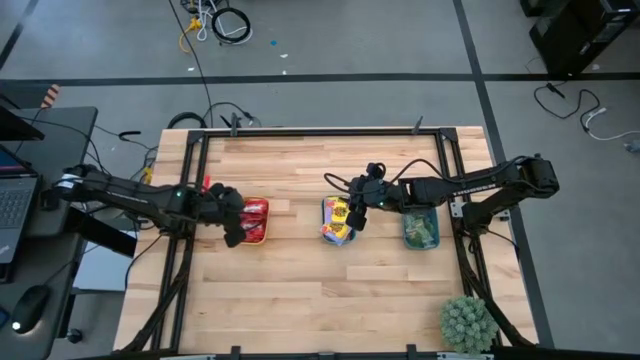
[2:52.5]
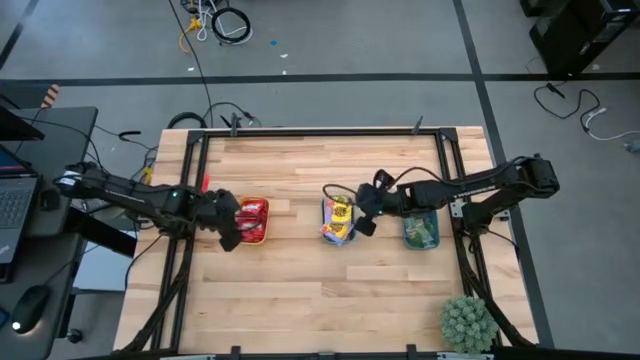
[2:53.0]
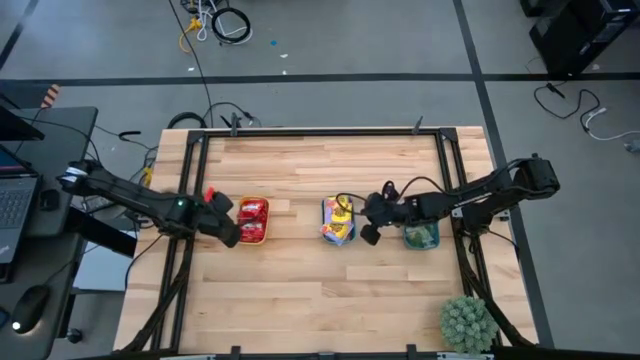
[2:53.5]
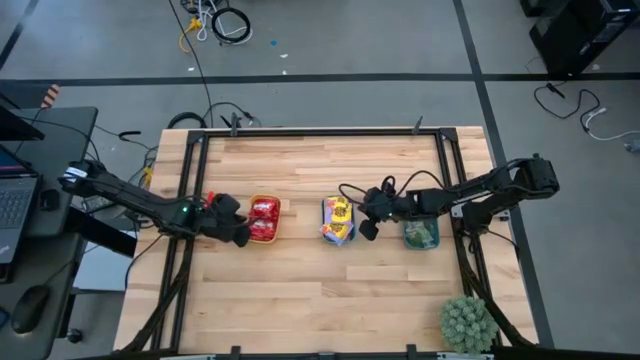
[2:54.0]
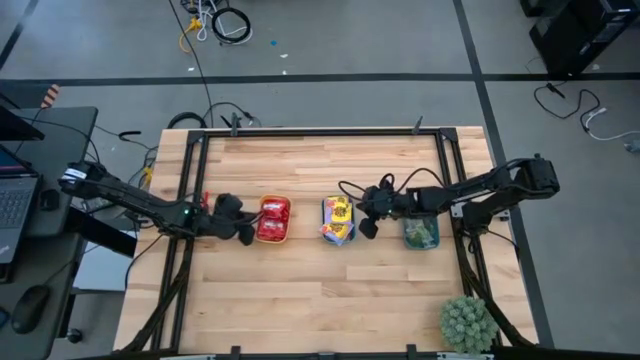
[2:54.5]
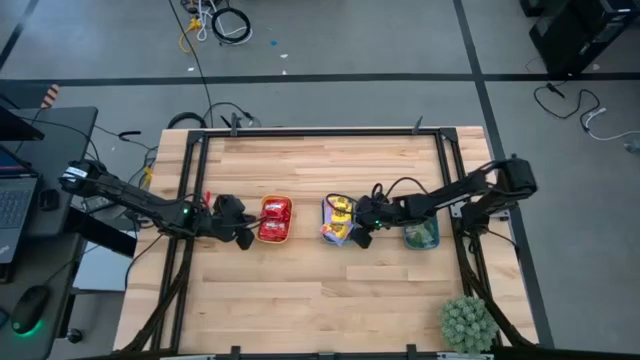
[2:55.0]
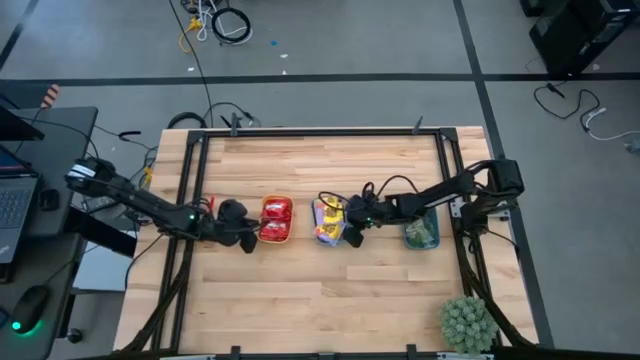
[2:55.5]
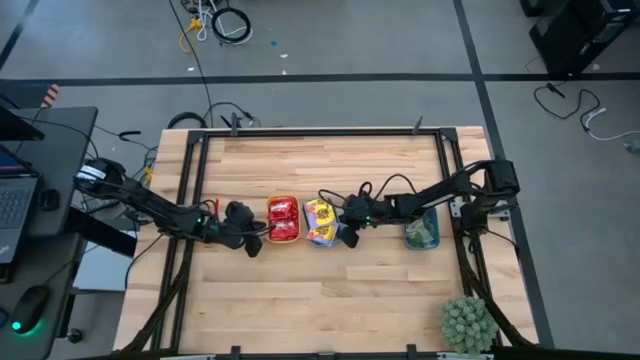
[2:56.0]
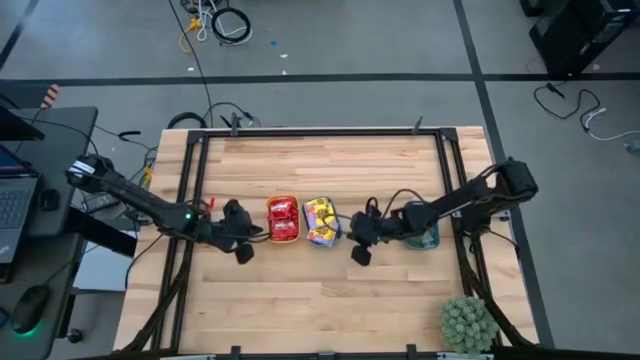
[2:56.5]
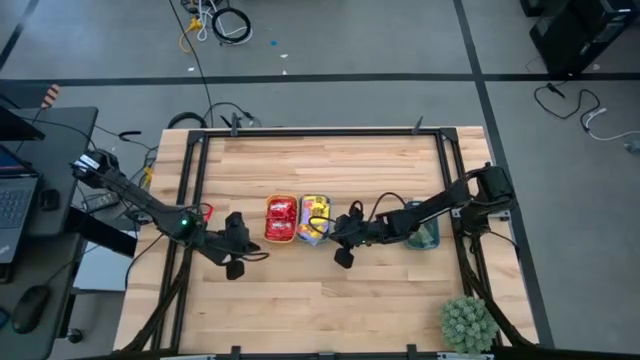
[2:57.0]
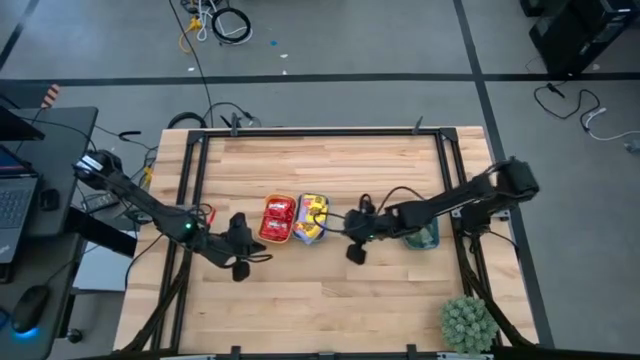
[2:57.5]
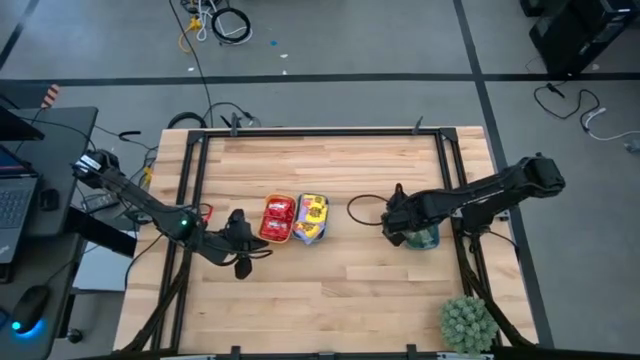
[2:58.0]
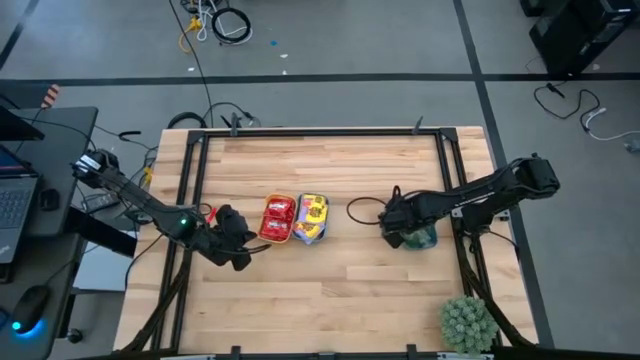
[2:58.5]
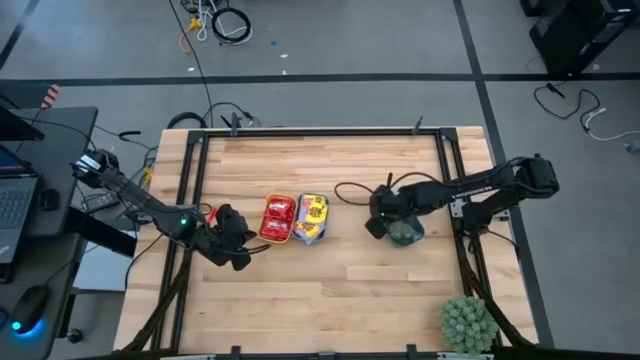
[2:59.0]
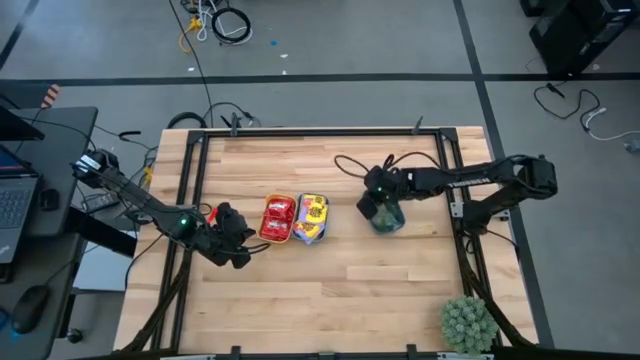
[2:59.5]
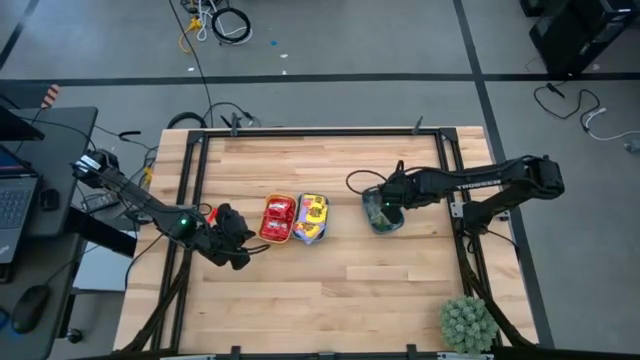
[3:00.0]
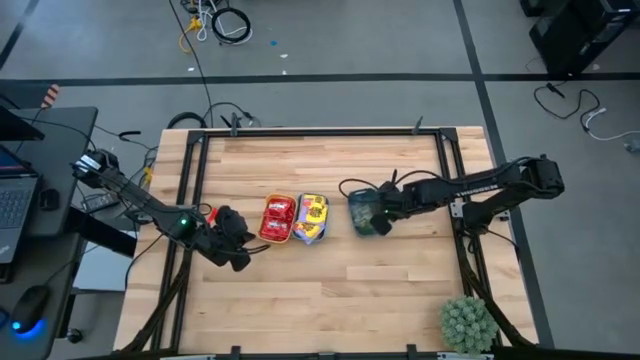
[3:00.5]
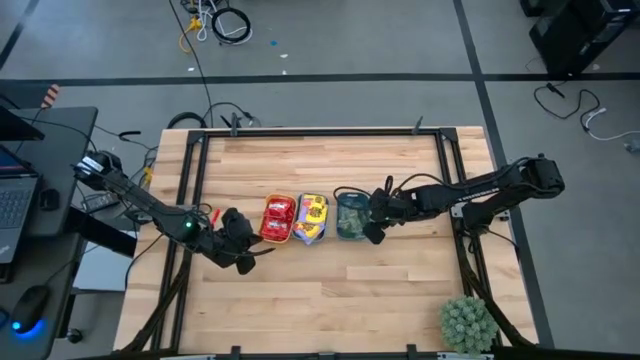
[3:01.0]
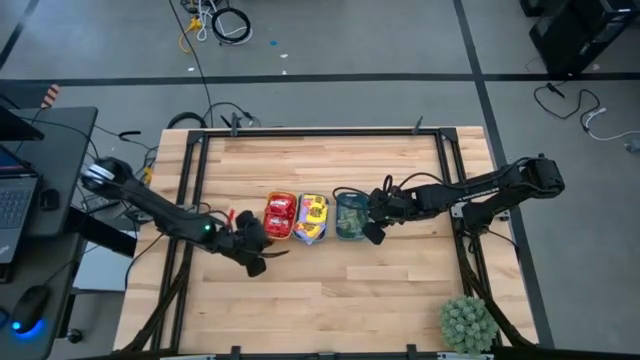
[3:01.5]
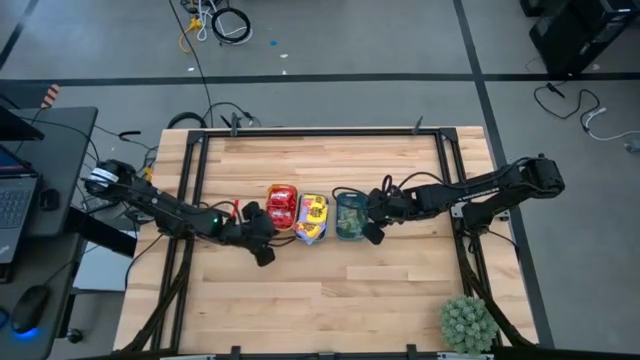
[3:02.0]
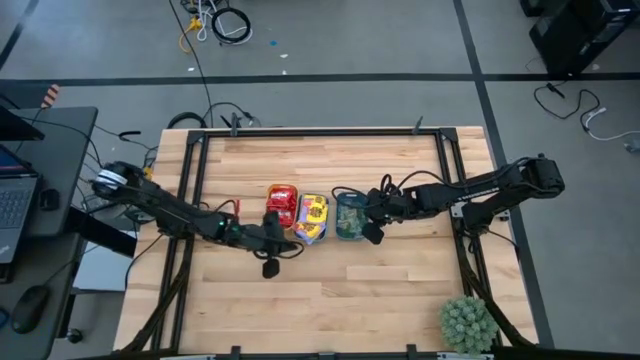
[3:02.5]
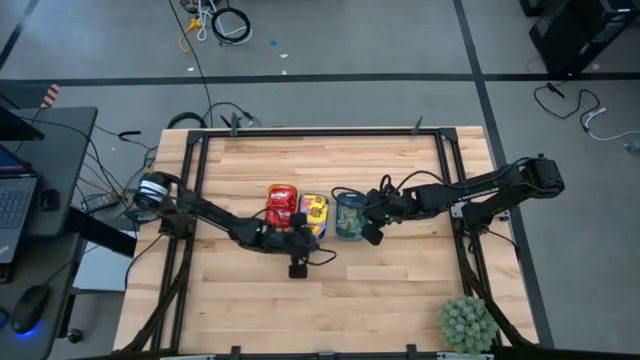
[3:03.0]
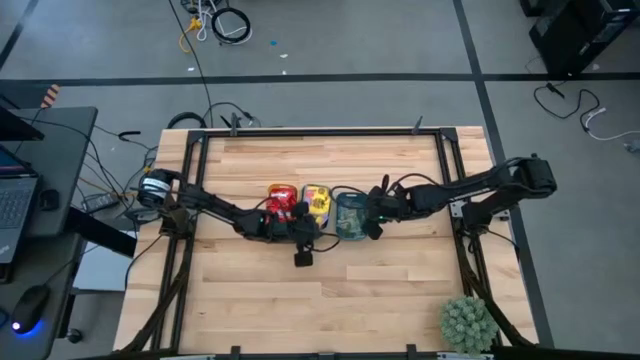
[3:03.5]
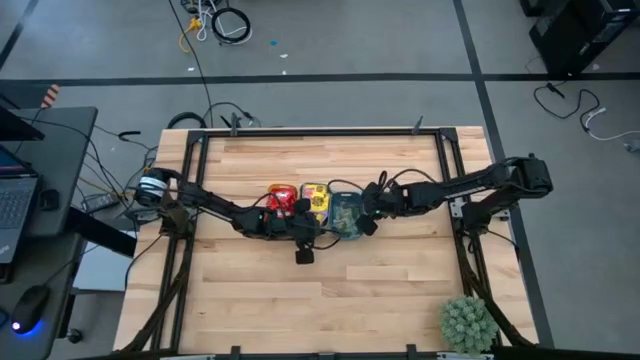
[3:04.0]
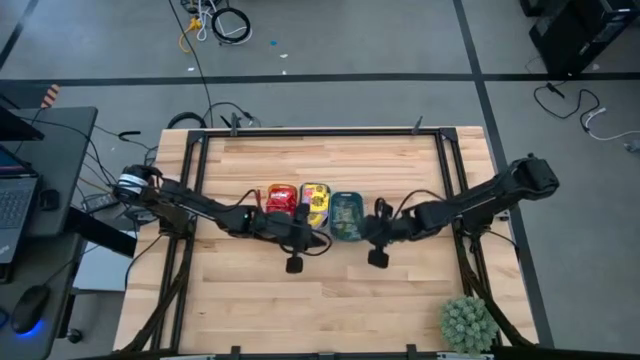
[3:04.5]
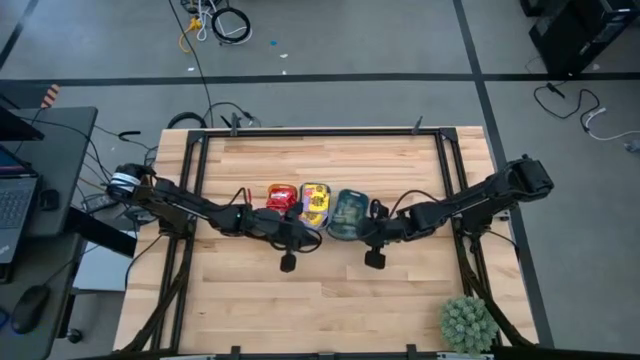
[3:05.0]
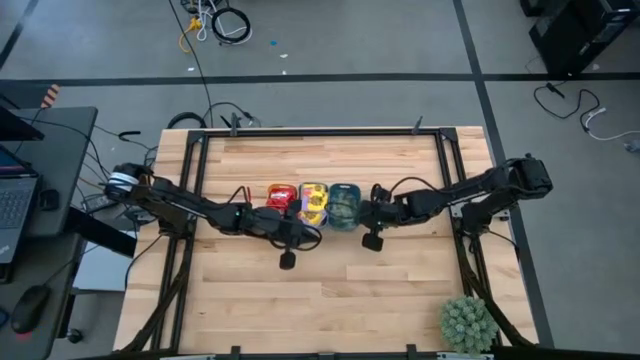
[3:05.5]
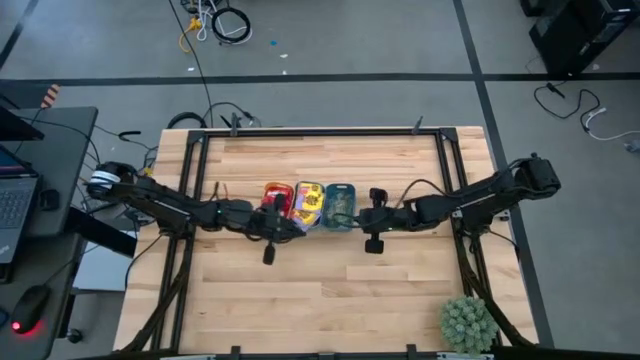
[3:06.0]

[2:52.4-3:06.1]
Task: Sort candy
Adjust the bins to the center of the table

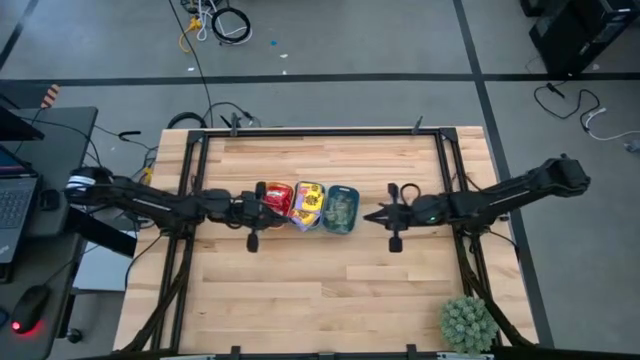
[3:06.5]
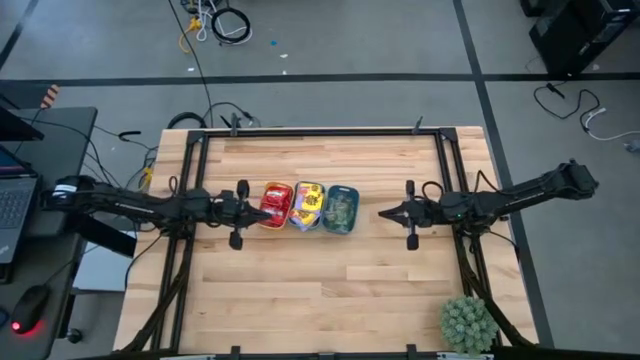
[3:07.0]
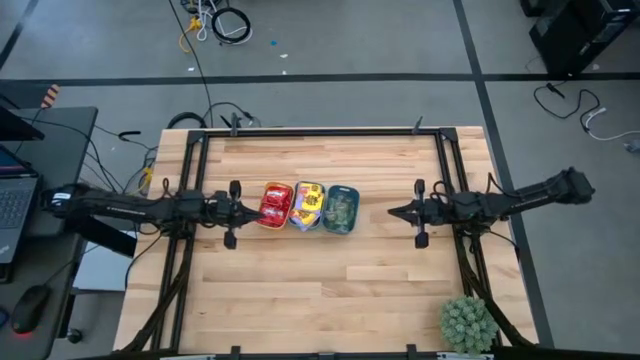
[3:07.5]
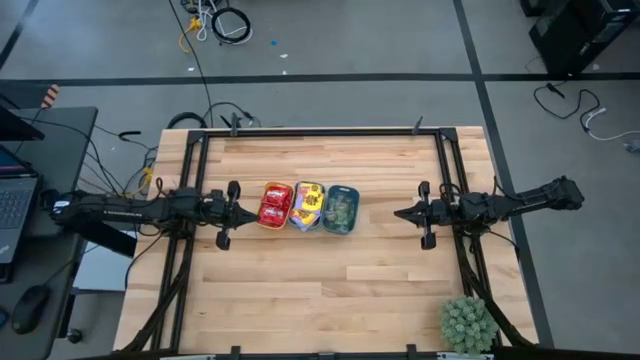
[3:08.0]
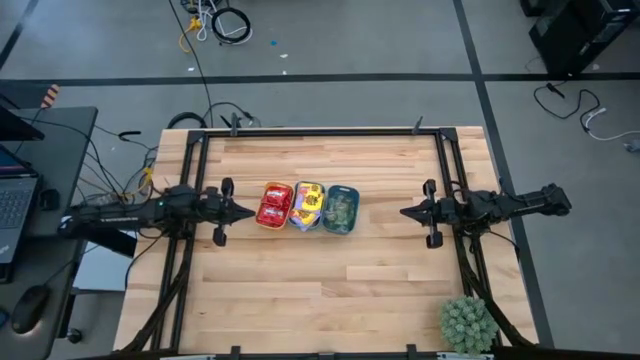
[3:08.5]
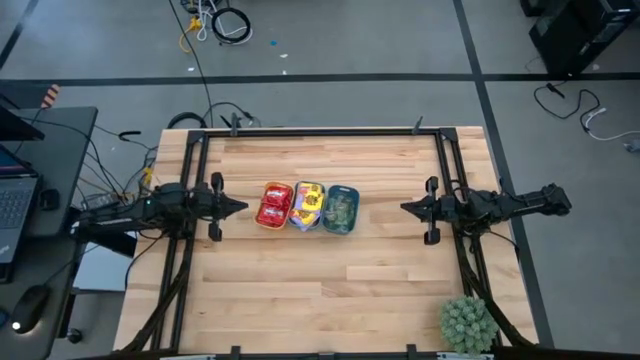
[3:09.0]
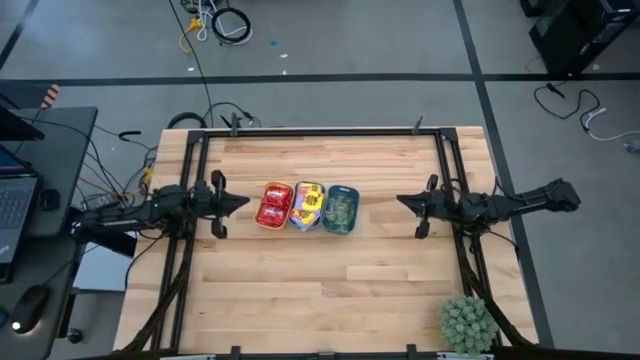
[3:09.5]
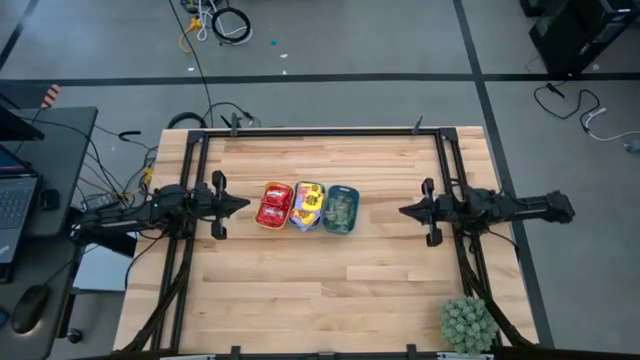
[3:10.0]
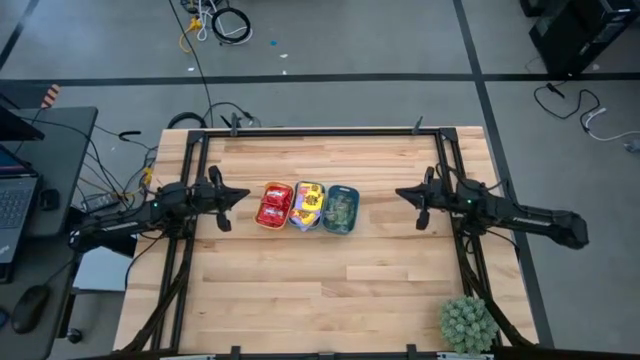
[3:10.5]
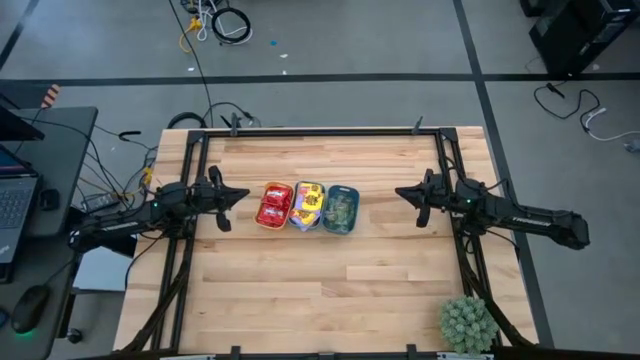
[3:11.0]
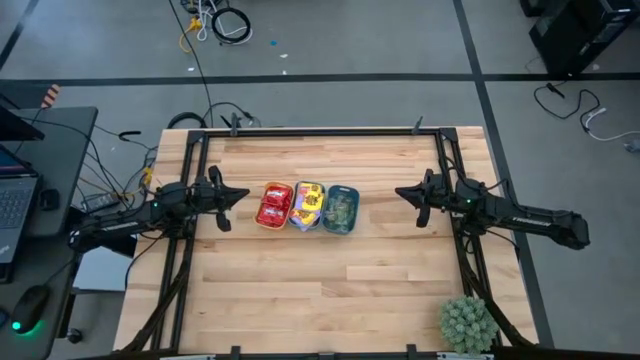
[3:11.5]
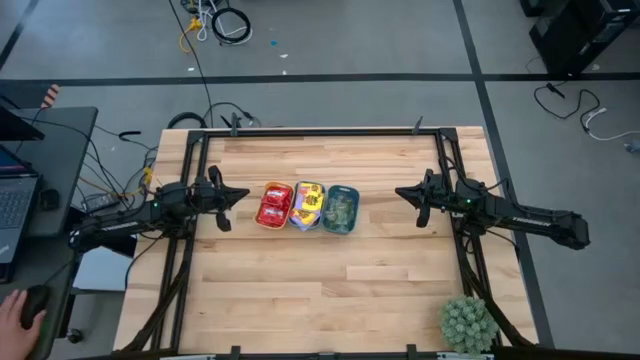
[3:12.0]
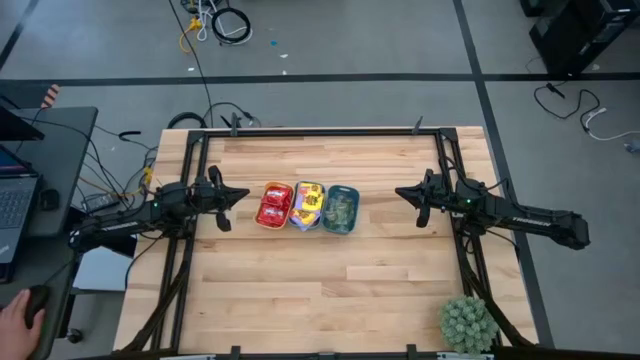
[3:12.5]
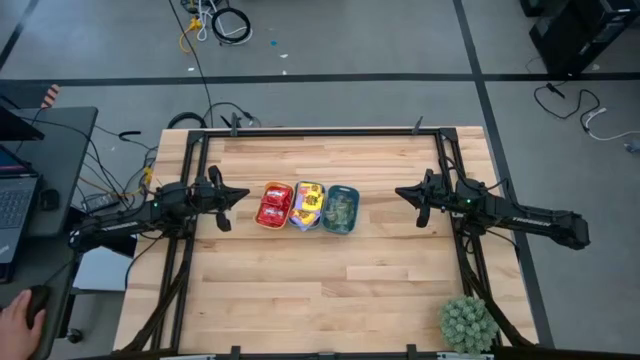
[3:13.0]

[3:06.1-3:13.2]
Return to Home Position
